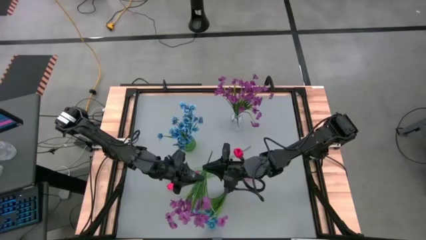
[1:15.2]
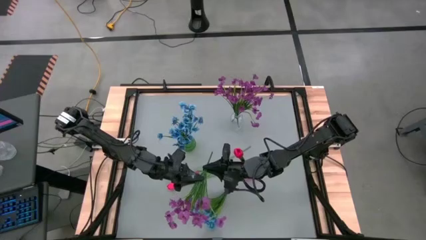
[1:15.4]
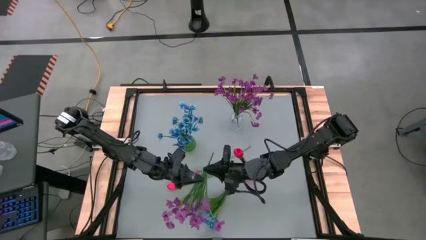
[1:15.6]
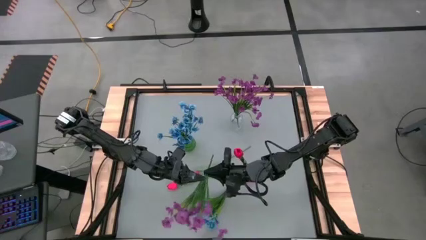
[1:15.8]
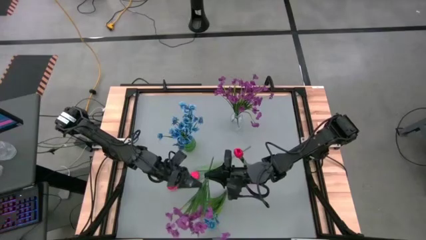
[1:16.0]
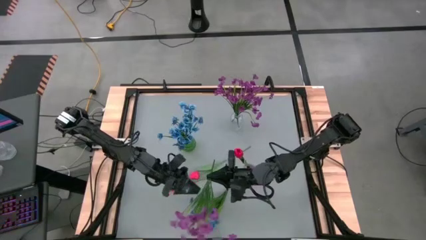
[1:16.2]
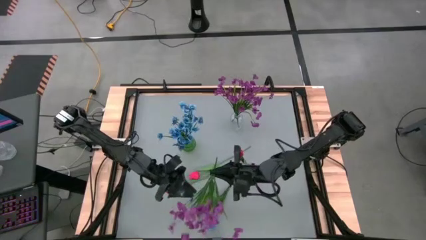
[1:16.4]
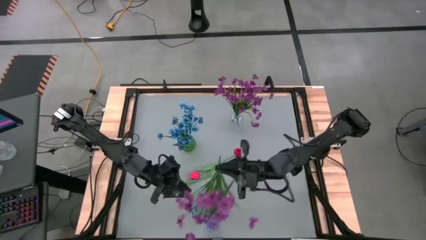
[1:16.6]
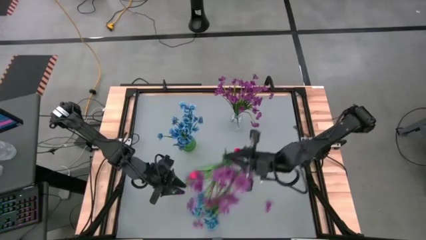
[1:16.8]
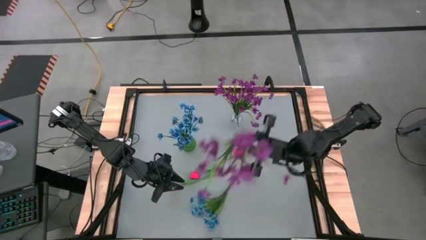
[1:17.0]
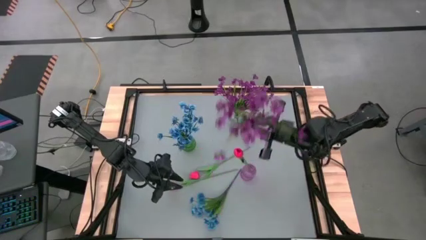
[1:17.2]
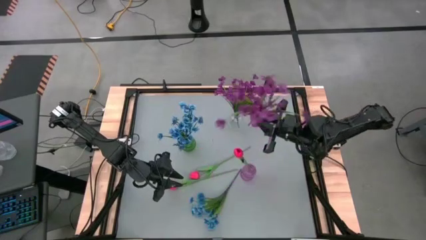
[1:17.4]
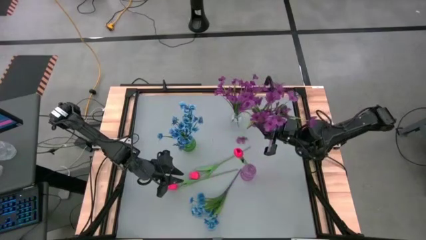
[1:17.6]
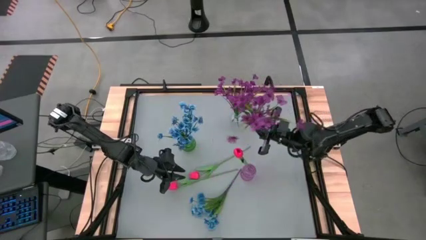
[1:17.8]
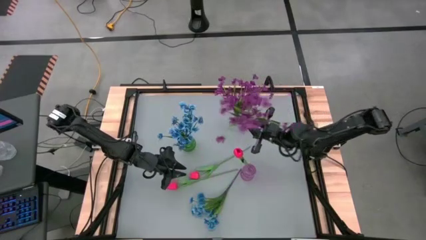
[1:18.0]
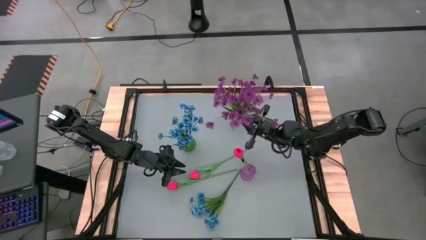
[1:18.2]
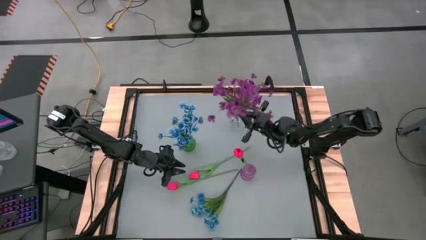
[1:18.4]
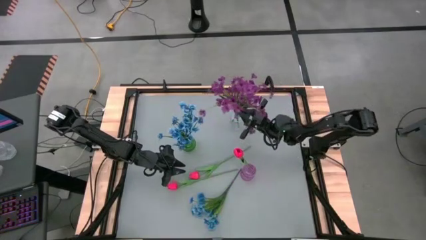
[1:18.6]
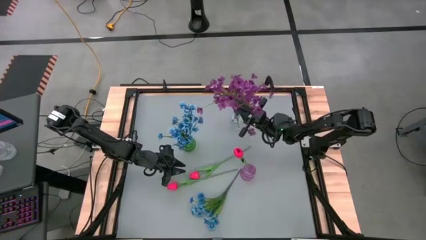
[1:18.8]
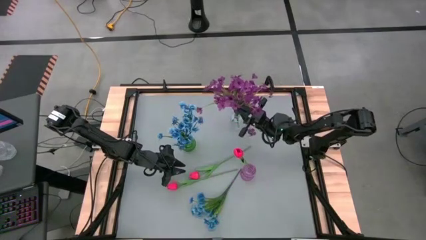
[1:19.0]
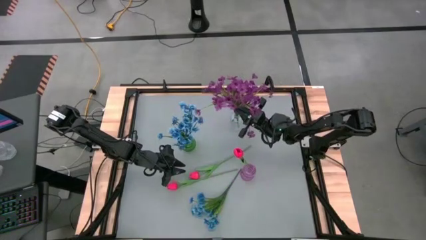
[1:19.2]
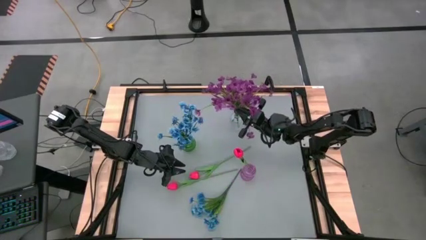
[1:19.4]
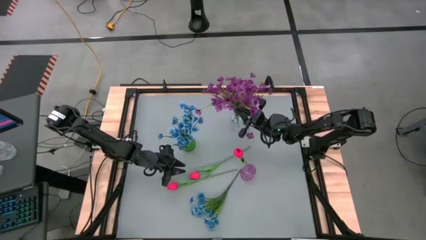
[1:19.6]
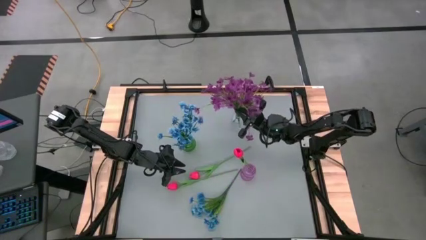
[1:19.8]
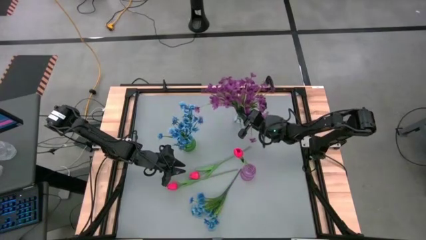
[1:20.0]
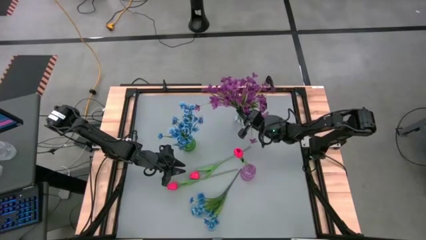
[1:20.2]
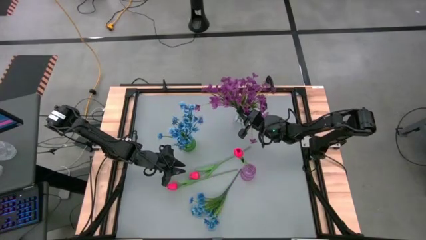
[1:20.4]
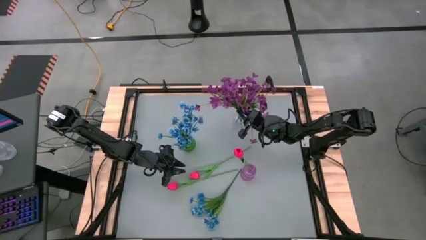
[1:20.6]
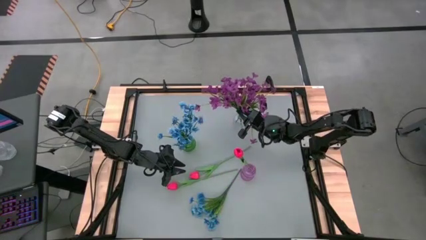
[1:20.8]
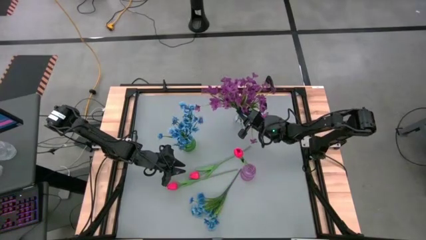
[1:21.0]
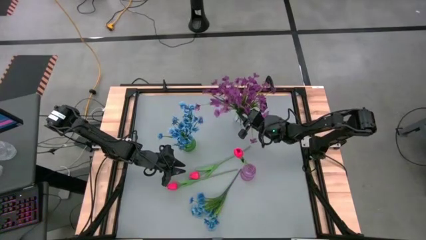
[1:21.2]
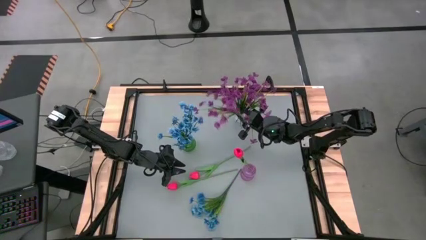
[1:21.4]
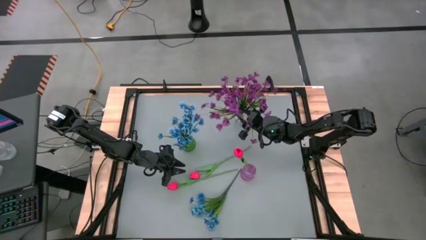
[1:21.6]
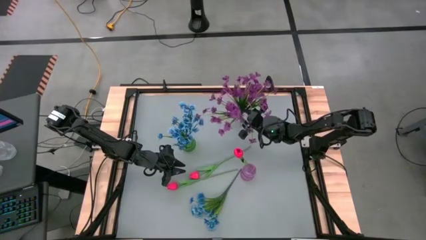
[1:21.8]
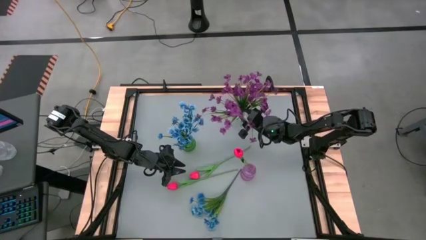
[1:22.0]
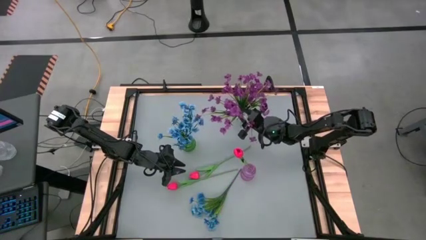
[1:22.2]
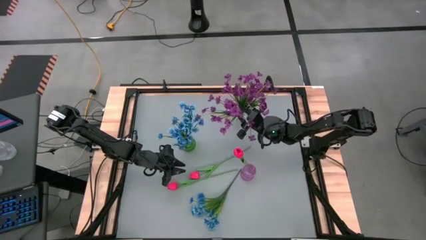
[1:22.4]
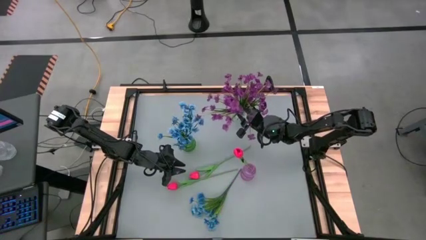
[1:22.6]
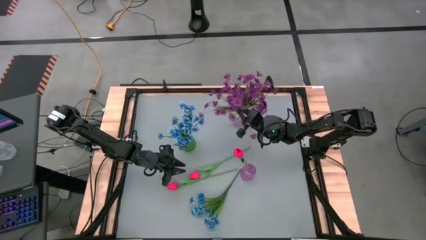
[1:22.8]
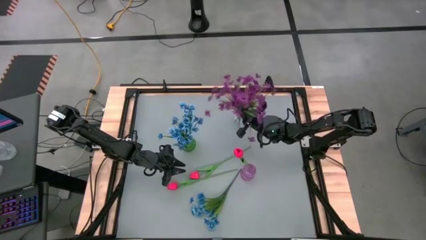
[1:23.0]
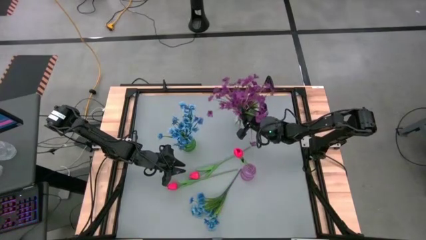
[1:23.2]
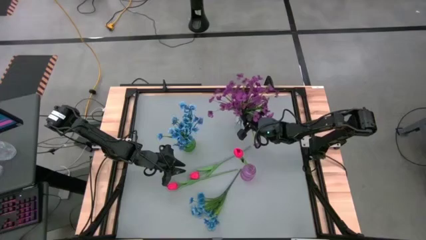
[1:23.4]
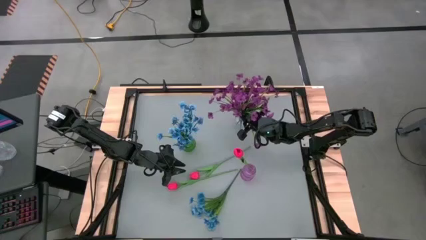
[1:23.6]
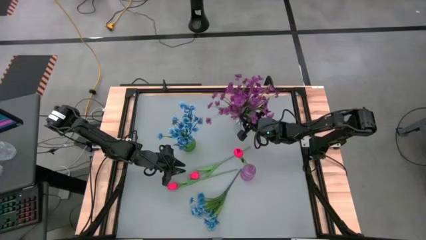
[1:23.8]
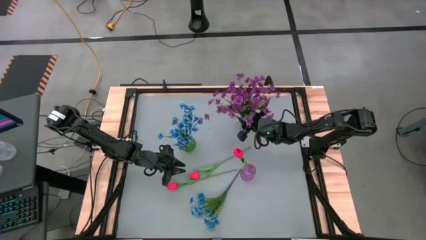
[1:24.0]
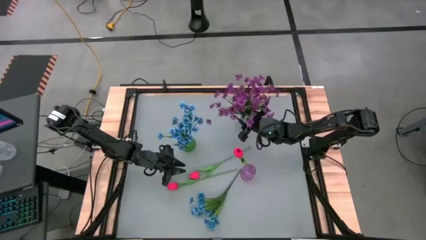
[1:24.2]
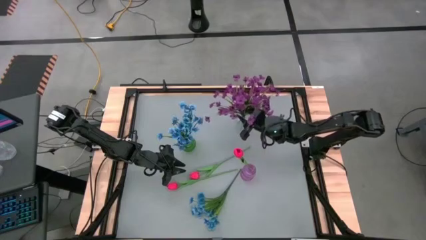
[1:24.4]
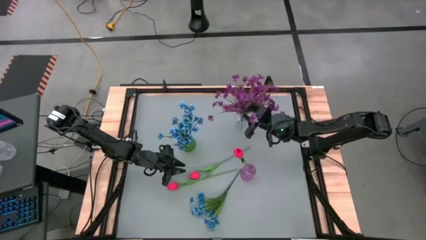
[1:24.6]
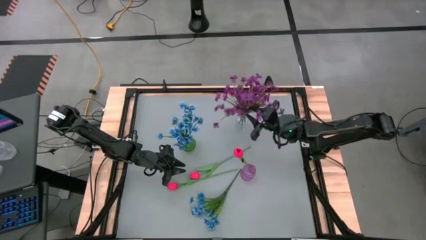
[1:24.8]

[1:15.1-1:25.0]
Task: Sort flowers into vase by color
Put the purple flowers into the transparent flower vase

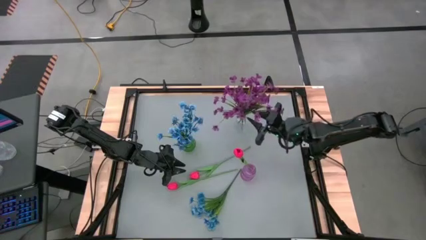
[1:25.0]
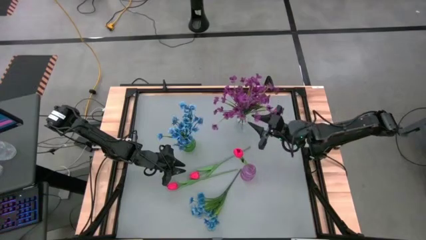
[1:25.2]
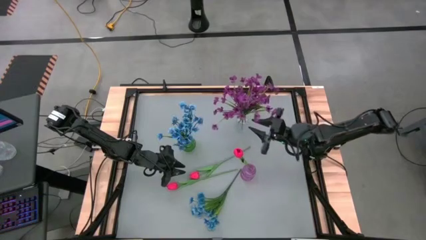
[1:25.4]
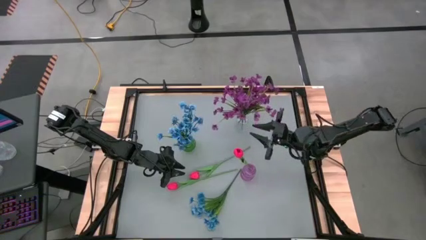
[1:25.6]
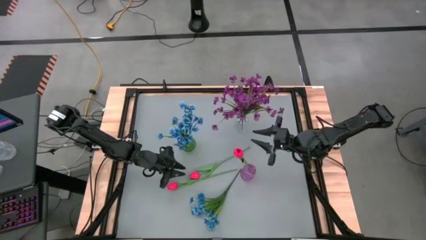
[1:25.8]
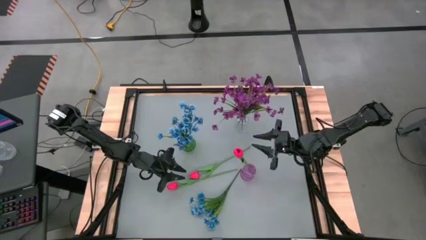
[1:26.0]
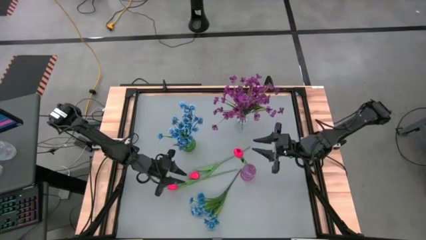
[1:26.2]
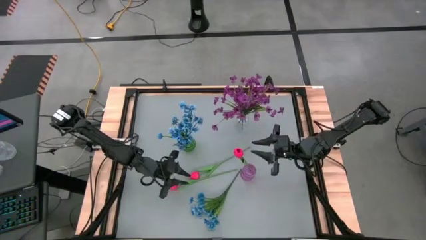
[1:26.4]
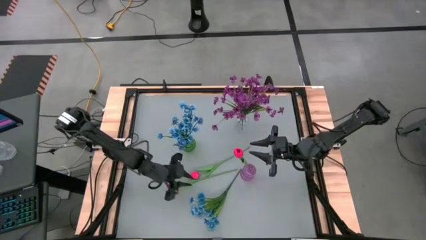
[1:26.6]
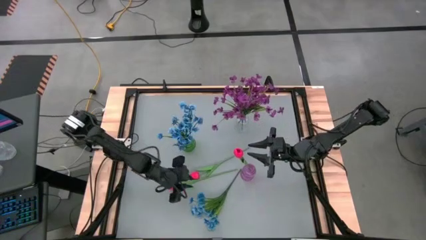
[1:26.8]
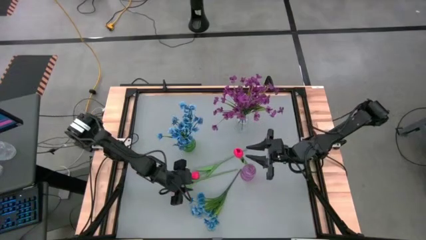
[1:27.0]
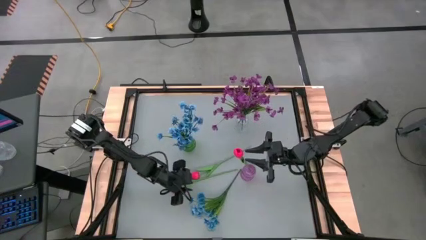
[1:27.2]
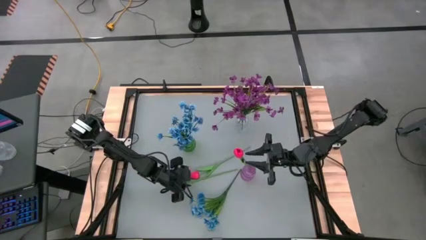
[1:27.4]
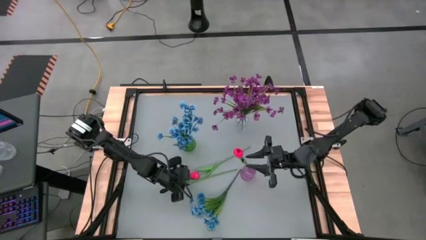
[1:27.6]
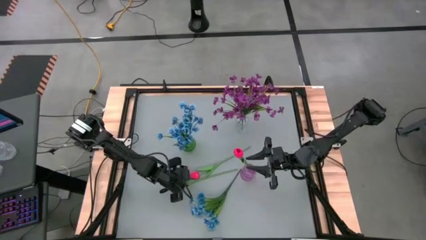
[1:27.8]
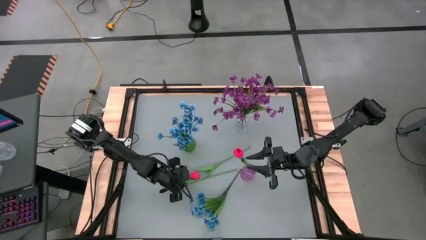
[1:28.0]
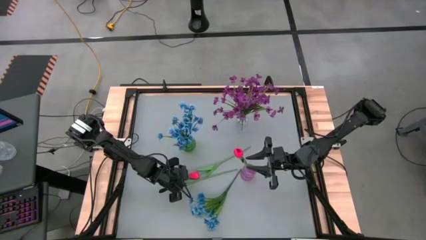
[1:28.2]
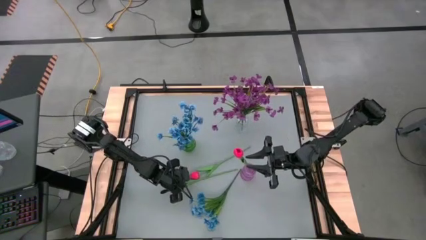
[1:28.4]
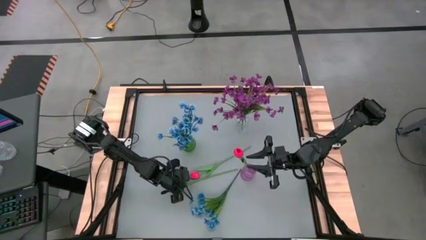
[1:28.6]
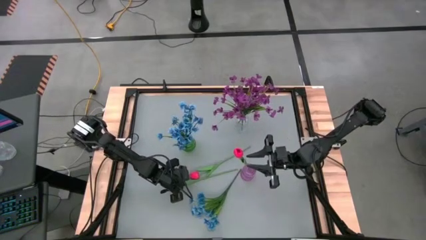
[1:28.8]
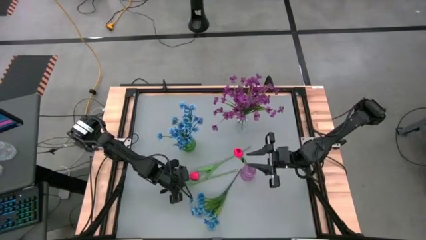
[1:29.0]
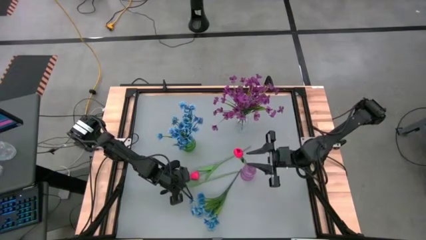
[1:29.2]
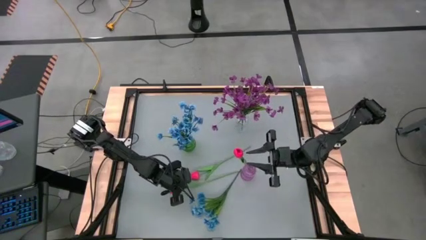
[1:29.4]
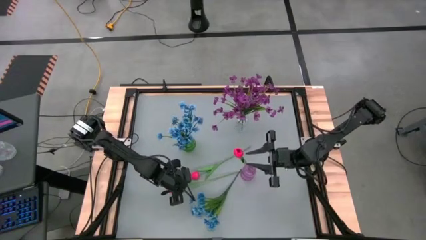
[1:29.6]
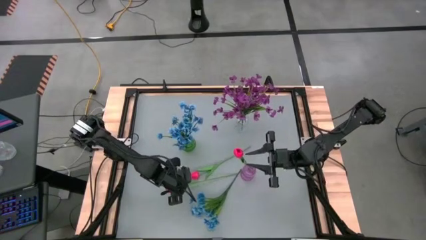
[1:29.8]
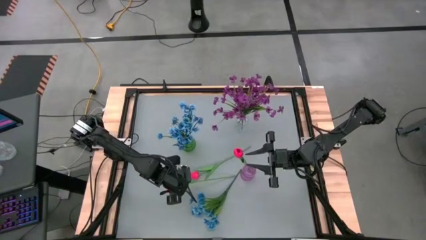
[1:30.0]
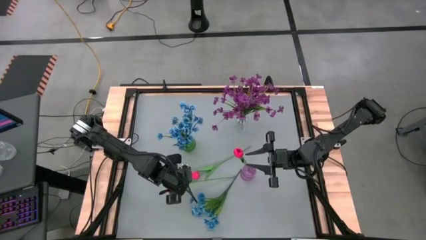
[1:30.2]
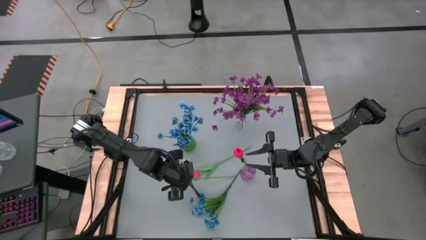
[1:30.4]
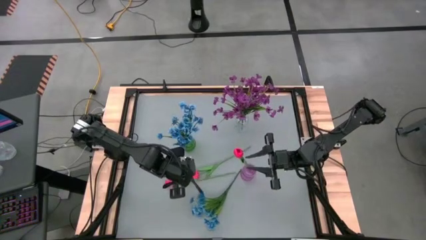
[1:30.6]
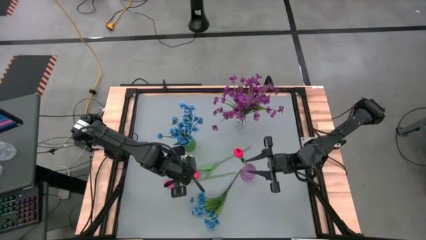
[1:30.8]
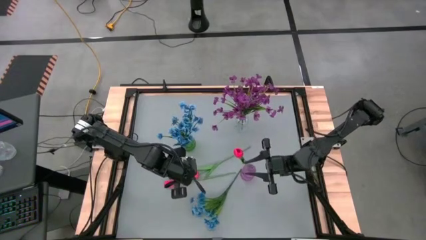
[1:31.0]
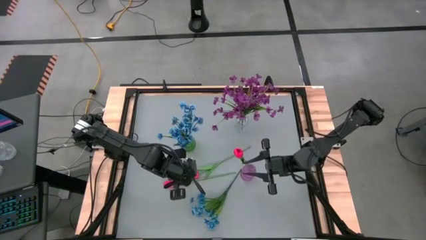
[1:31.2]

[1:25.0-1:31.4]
Put the left pink tulip into the purple flower vase
